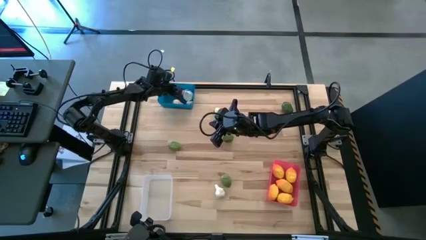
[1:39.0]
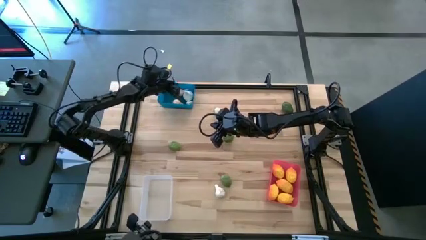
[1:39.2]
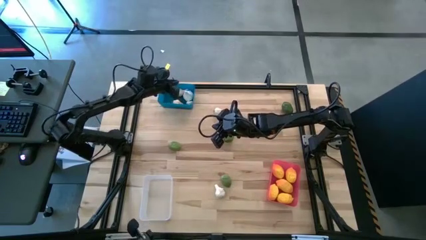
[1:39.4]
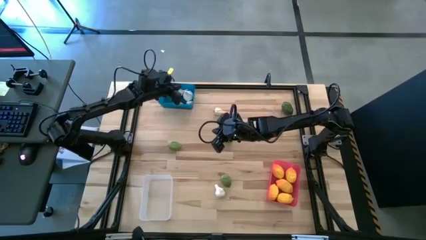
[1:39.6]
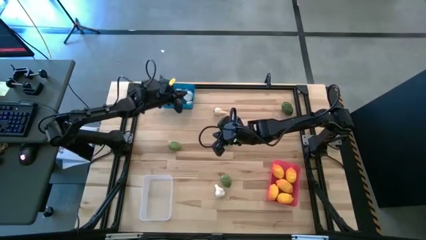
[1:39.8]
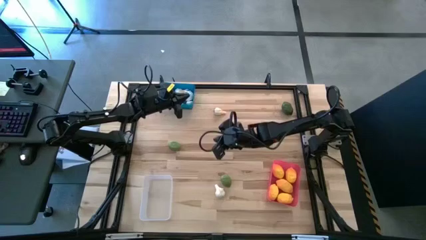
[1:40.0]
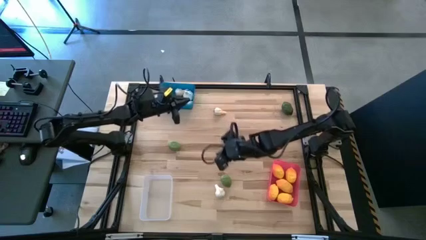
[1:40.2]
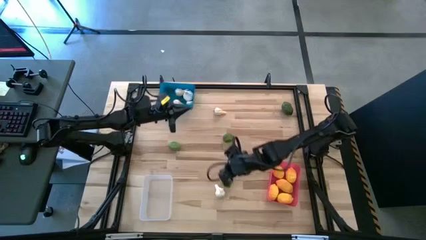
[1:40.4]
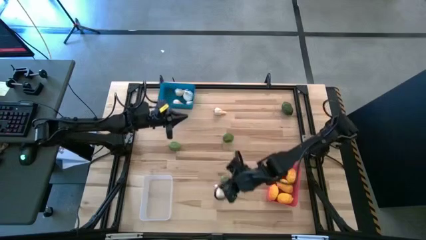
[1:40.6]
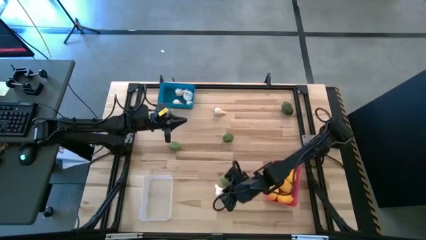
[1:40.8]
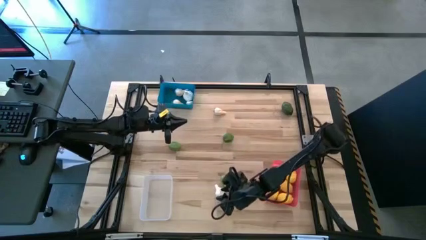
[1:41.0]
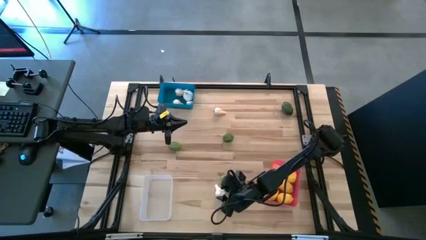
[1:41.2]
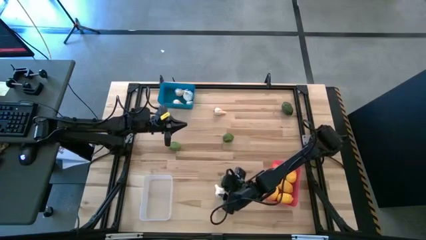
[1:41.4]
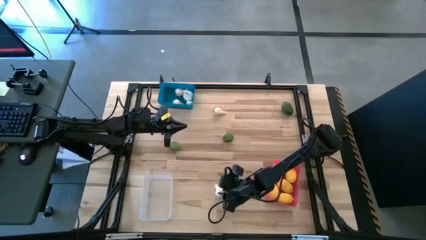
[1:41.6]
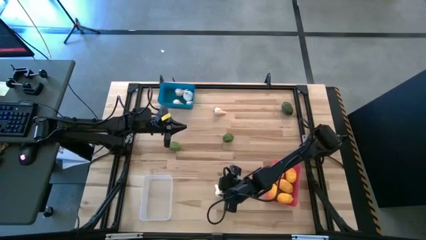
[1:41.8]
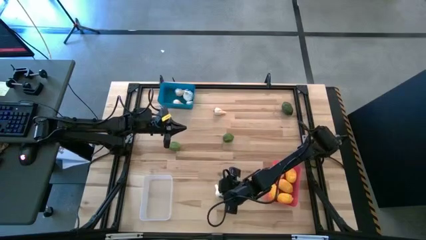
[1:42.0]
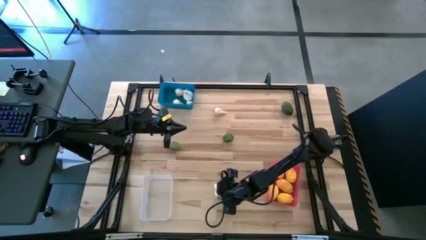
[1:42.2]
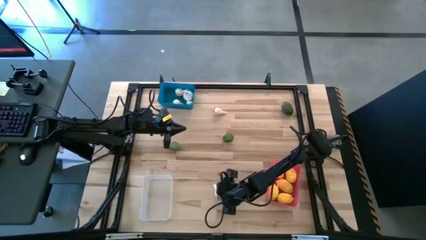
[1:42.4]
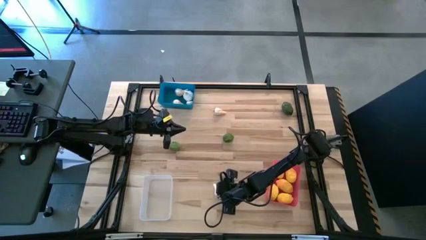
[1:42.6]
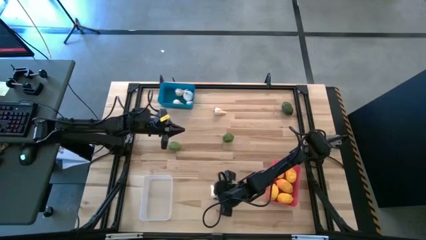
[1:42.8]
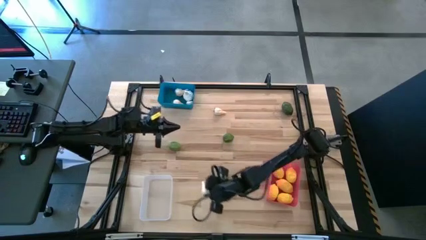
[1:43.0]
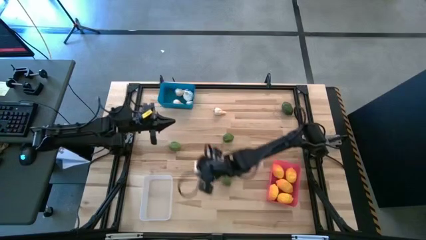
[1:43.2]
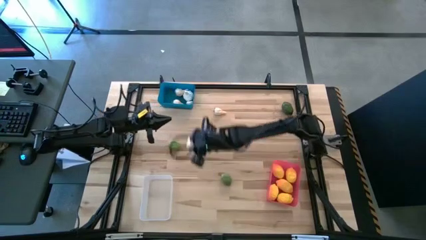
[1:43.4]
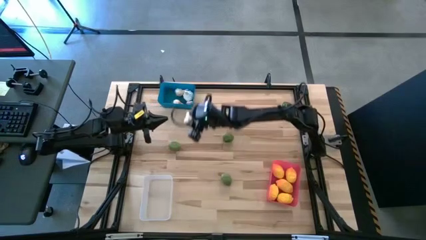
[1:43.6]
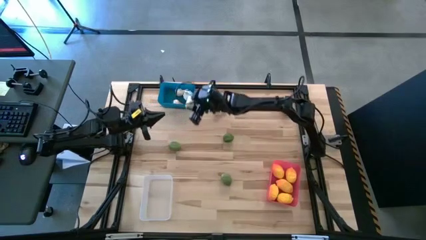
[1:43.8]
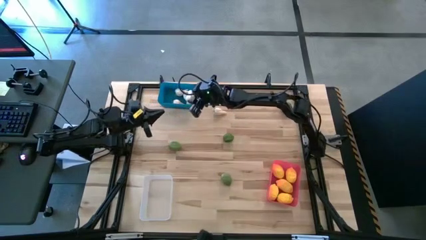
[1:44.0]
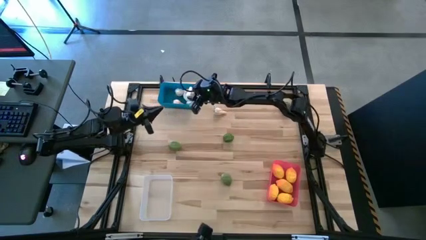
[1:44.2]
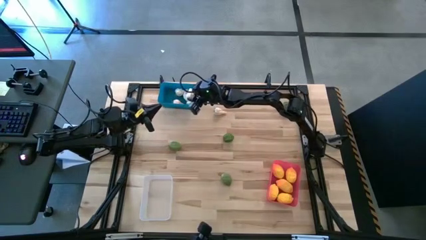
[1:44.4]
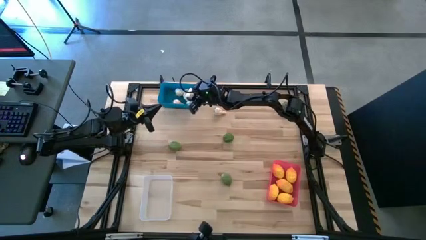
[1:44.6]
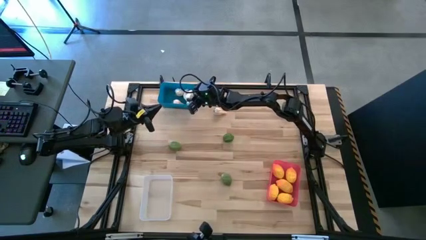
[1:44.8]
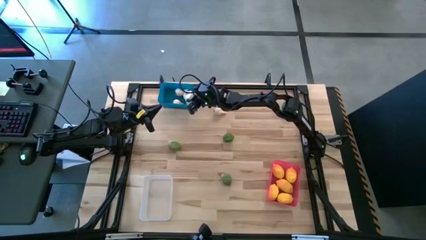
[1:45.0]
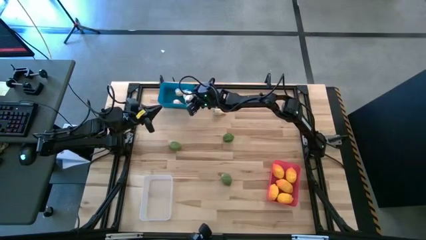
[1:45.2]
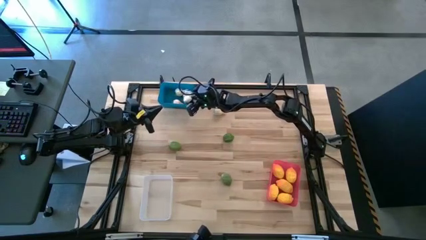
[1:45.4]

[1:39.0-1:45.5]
Task: Sort produce into baskets
Put the garlic into the blue bin

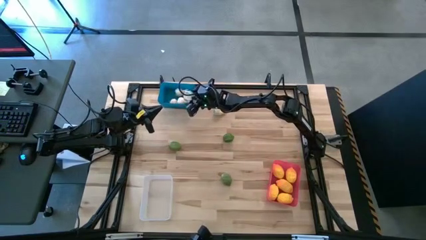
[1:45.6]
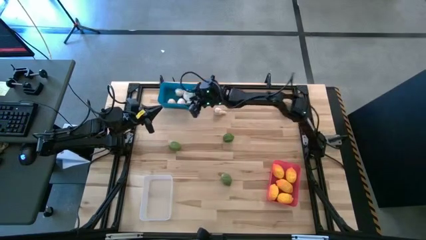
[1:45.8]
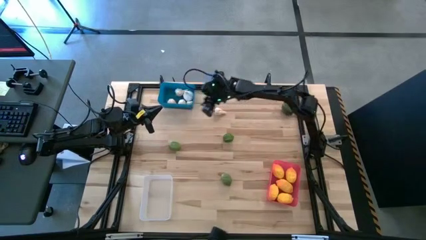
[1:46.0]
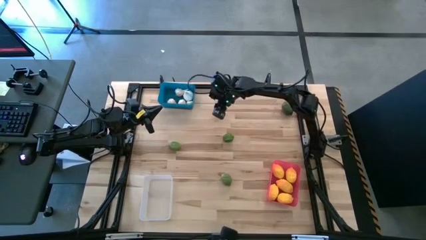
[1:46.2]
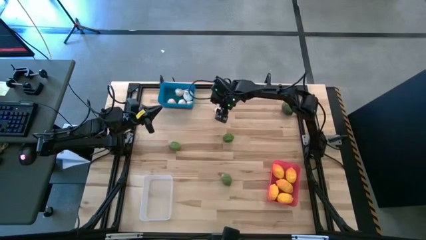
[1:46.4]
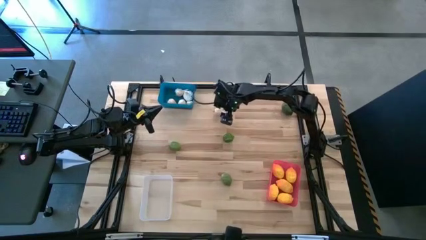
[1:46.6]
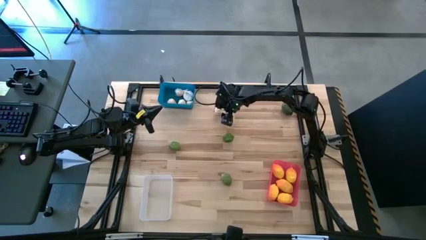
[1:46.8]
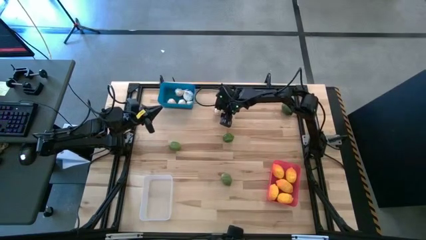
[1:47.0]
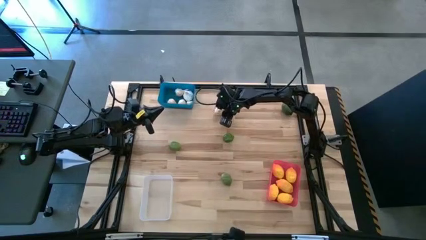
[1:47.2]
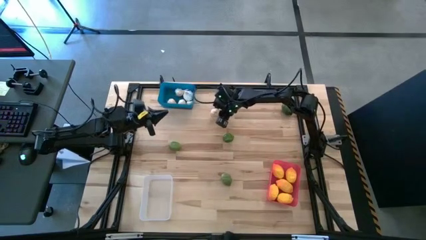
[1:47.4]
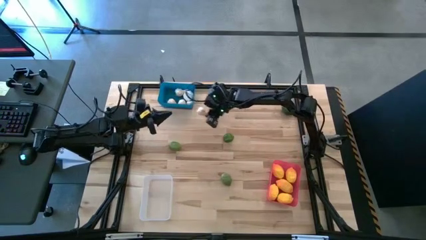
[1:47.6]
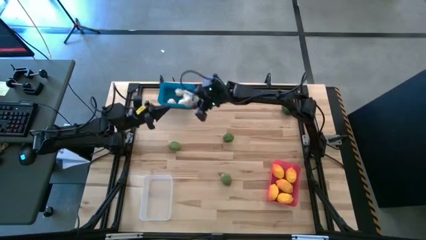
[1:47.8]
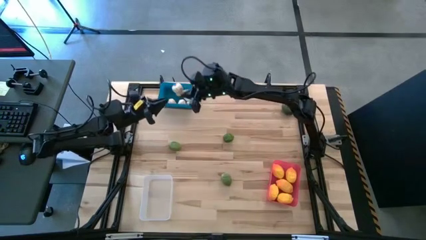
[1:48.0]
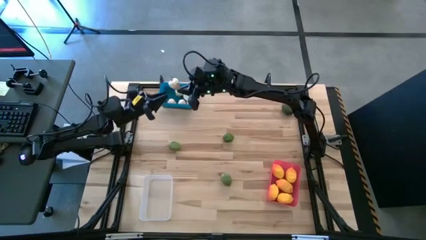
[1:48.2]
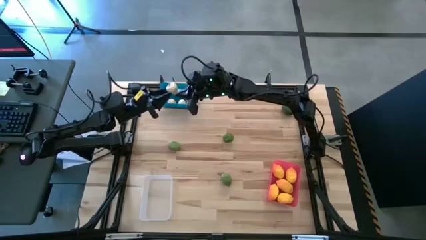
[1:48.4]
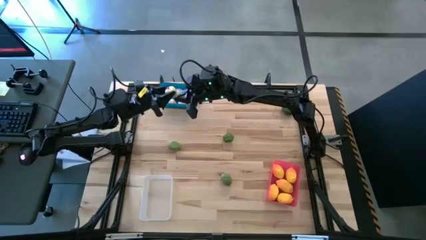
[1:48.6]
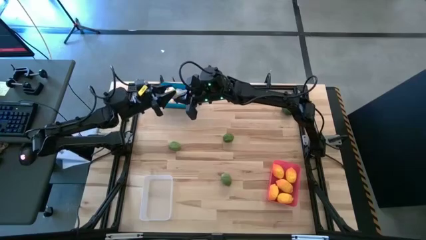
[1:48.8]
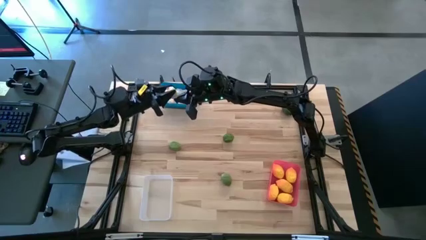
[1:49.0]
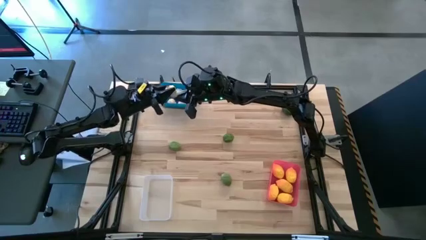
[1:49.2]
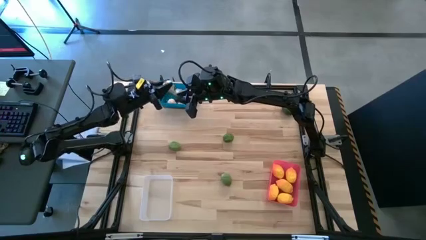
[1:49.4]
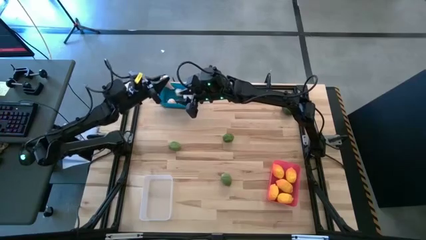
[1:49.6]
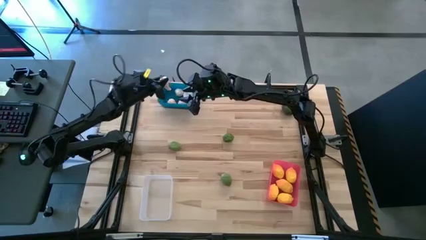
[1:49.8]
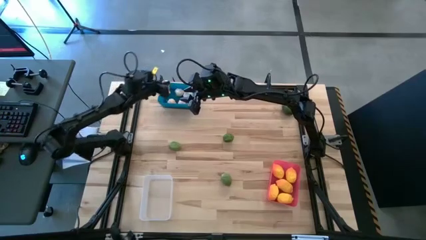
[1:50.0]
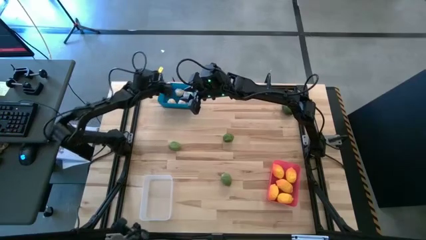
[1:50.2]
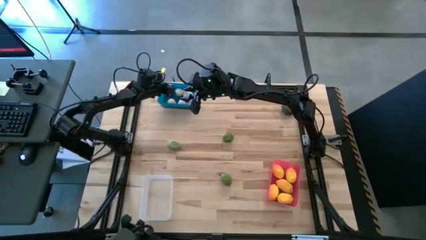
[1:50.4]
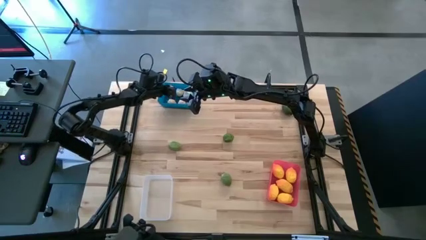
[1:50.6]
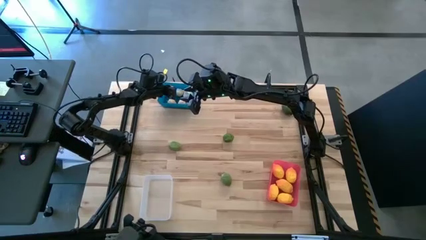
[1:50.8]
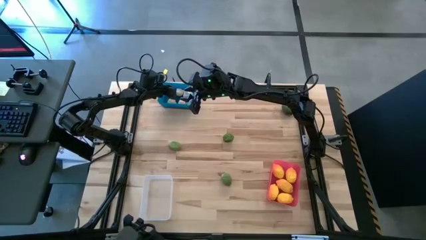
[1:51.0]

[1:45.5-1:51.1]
Put the garlic into the blue bin

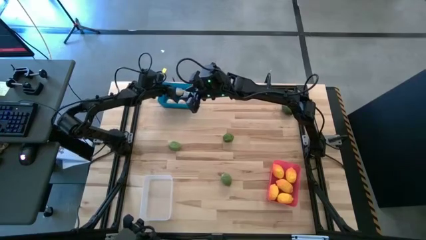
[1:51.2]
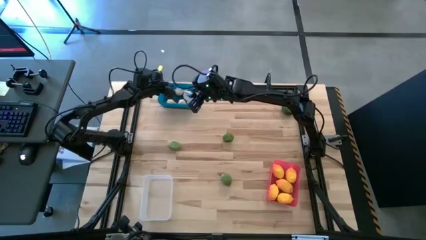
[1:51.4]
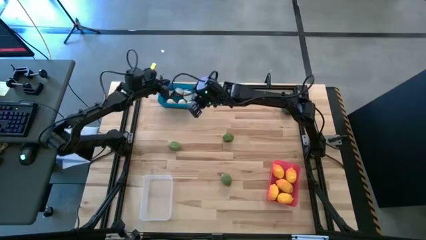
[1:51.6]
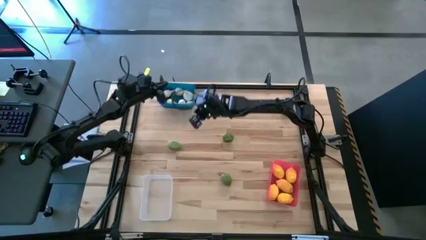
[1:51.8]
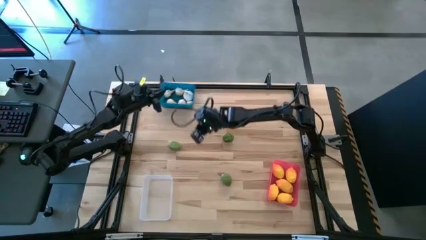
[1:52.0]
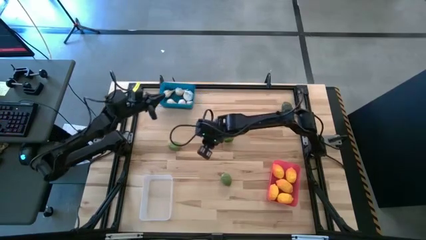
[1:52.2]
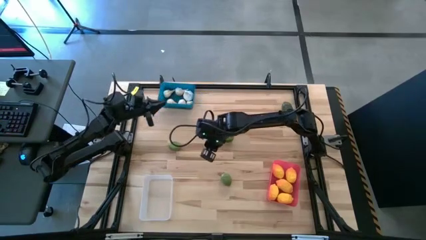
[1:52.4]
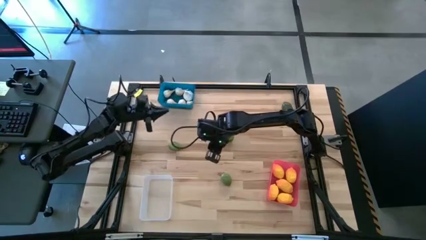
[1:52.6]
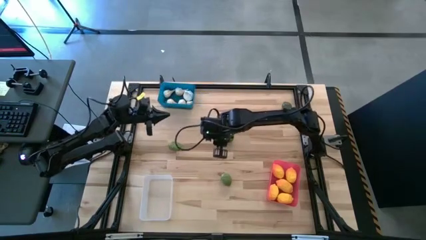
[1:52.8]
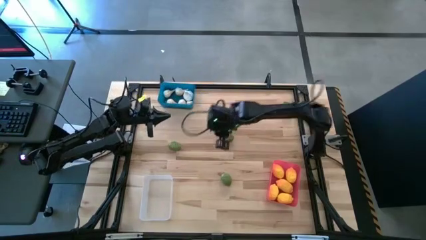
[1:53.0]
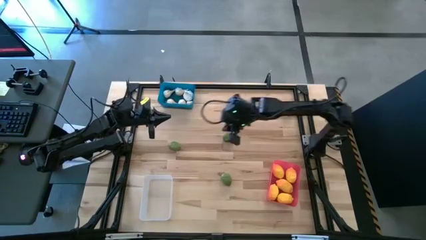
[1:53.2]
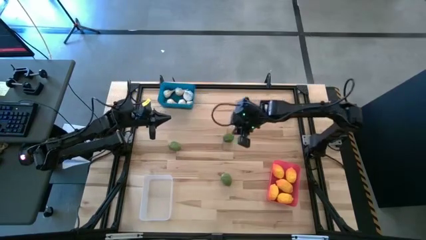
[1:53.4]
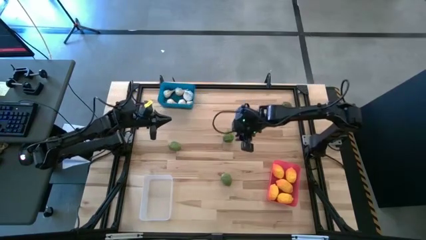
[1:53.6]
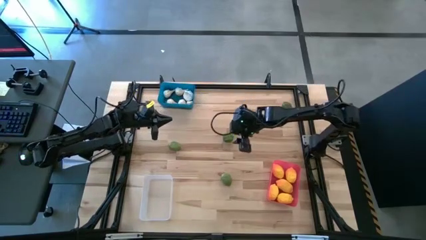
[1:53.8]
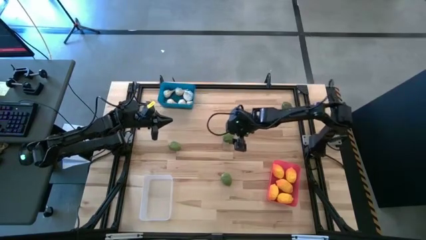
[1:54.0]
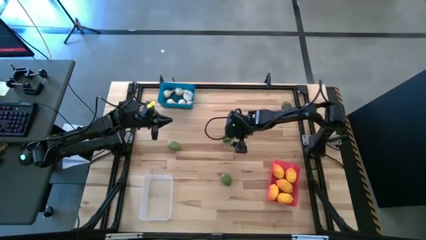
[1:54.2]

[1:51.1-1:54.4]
Put the lime into the transparent bin

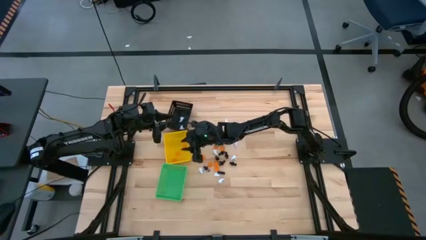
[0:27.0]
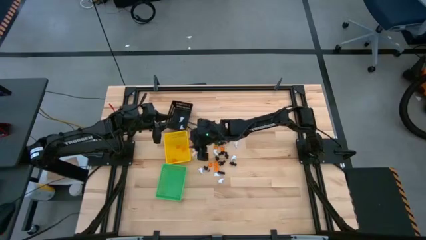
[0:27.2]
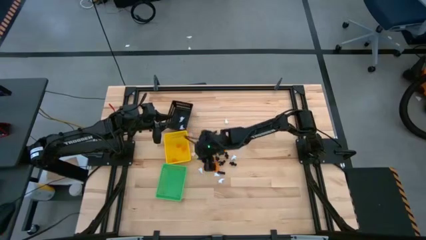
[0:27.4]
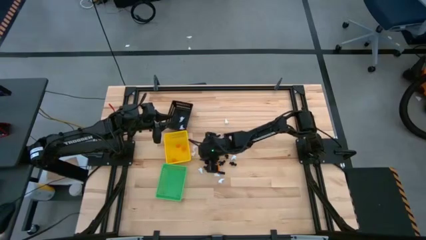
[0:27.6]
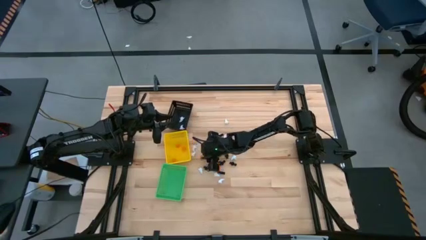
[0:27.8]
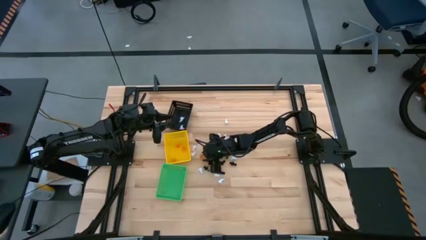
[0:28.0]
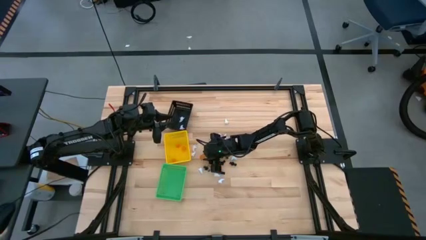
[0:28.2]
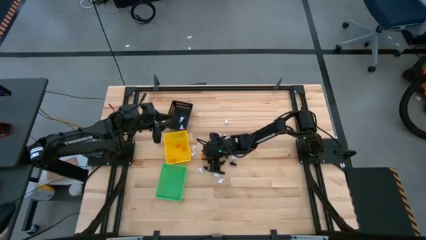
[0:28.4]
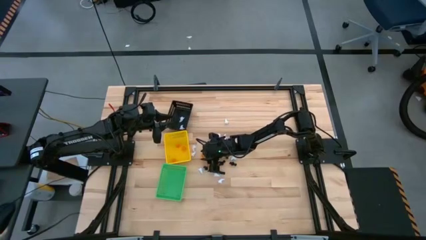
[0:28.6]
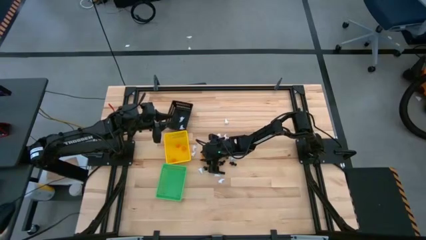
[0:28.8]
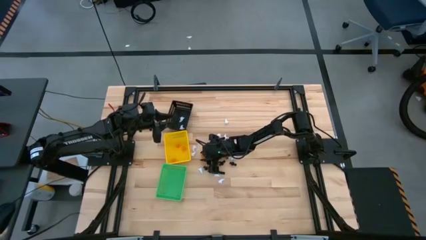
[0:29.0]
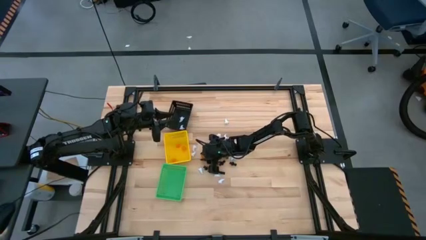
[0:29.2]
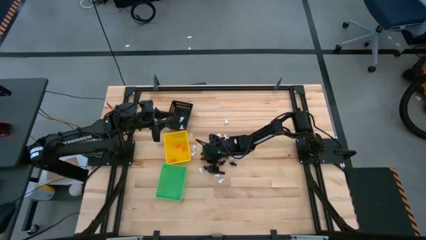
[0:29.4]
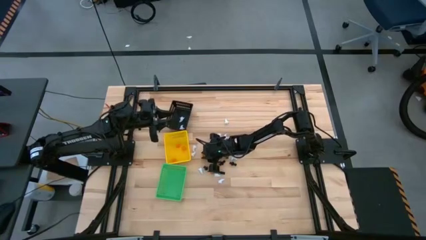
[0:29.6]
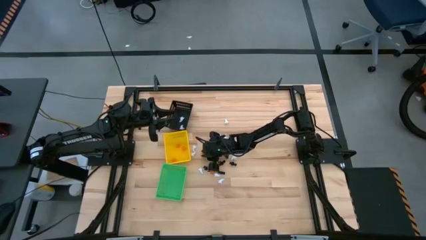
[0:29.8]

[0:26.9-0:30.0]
Task: Sort Halloween decoration
Put the orange pumpkin toy into the yellow basket
